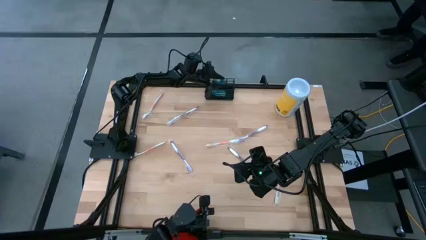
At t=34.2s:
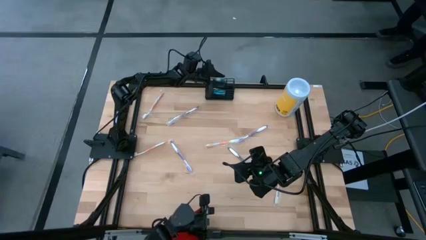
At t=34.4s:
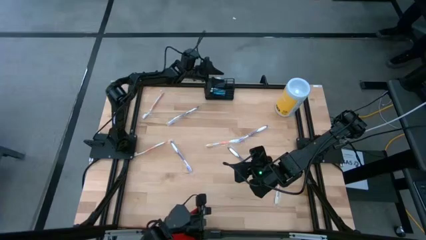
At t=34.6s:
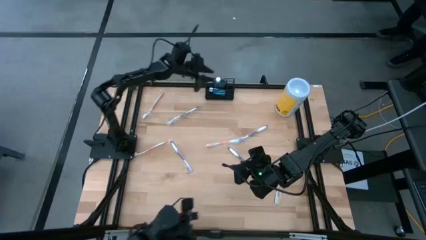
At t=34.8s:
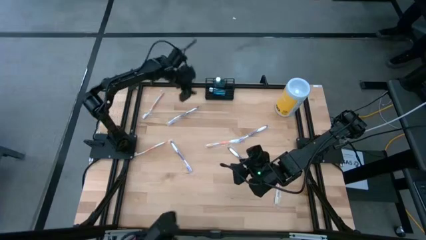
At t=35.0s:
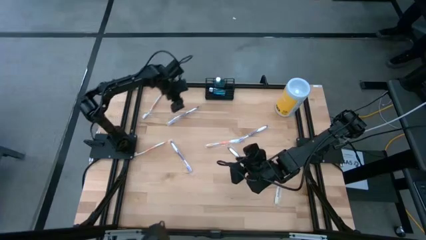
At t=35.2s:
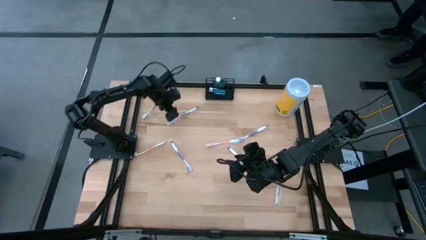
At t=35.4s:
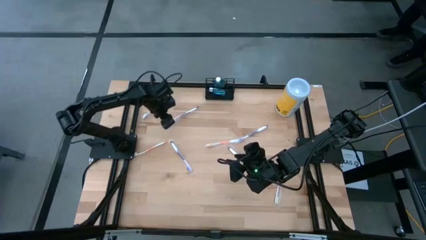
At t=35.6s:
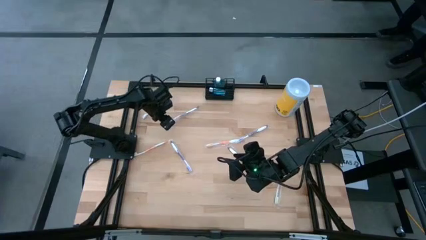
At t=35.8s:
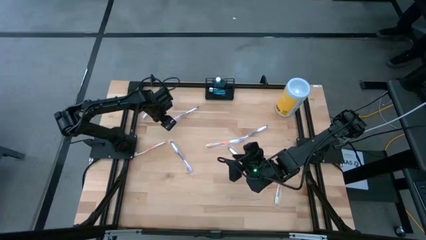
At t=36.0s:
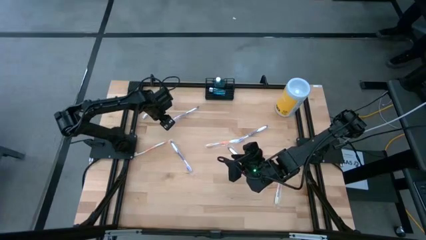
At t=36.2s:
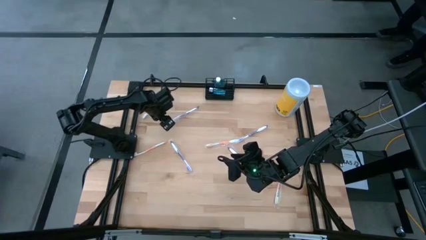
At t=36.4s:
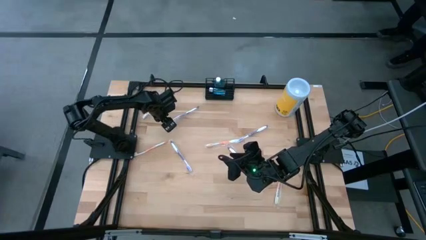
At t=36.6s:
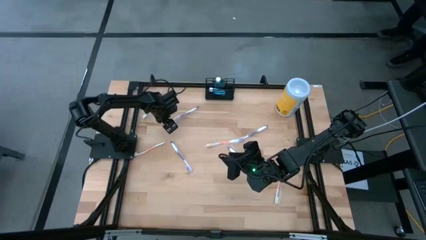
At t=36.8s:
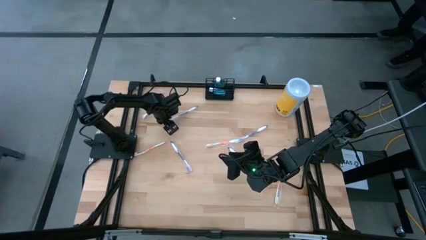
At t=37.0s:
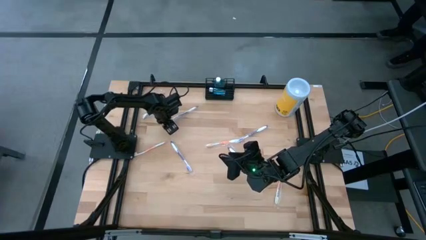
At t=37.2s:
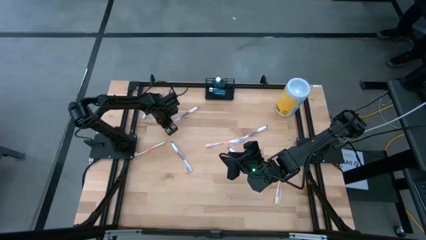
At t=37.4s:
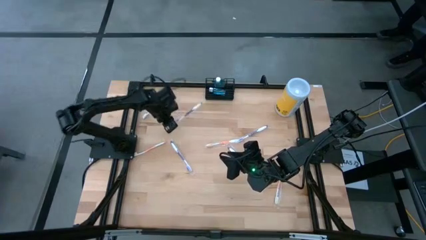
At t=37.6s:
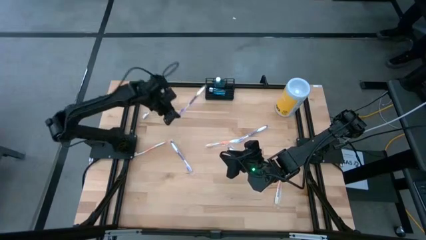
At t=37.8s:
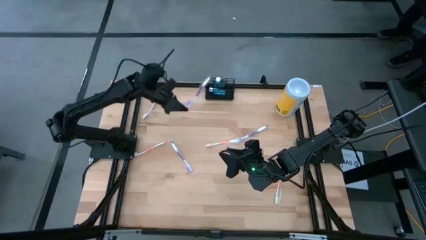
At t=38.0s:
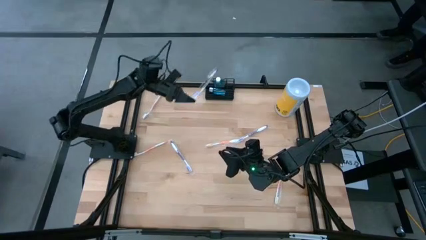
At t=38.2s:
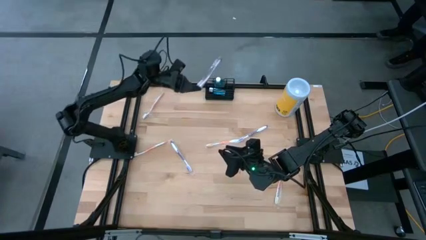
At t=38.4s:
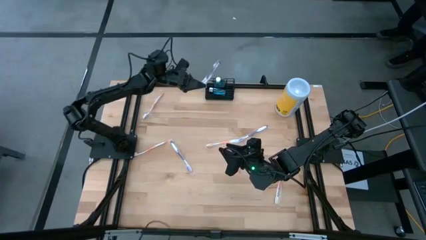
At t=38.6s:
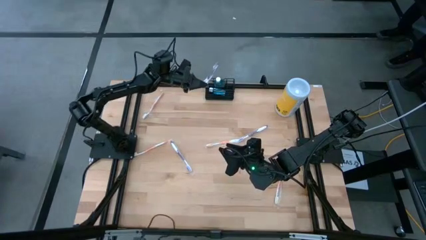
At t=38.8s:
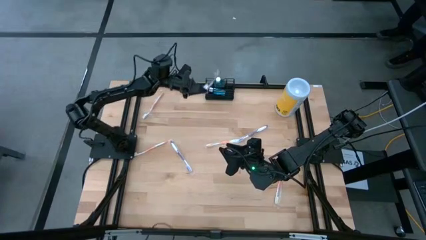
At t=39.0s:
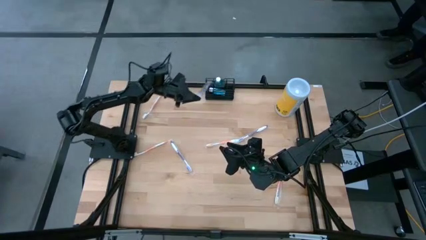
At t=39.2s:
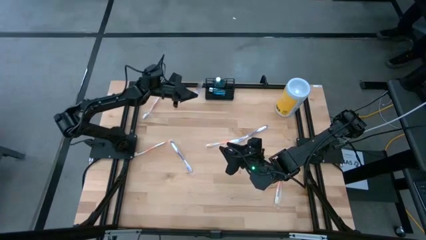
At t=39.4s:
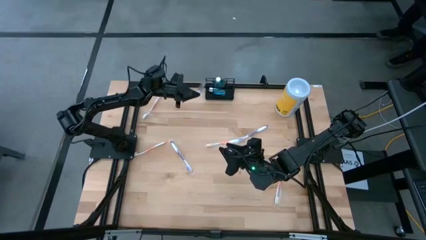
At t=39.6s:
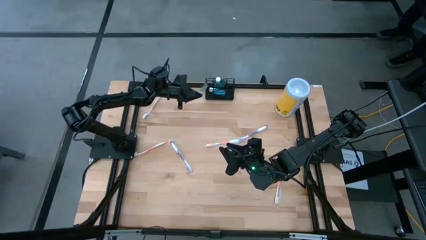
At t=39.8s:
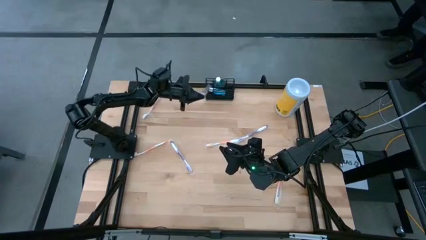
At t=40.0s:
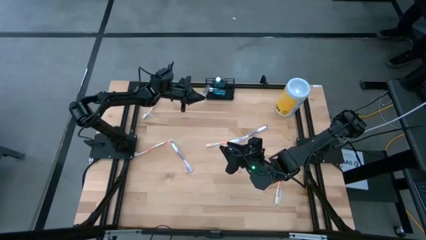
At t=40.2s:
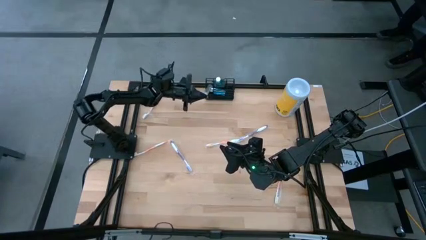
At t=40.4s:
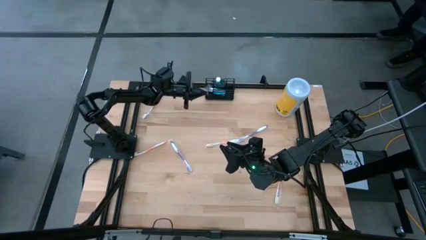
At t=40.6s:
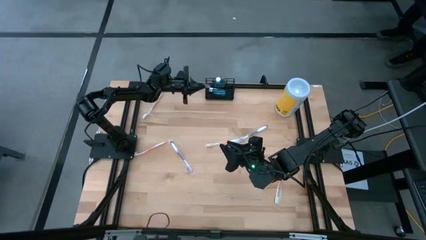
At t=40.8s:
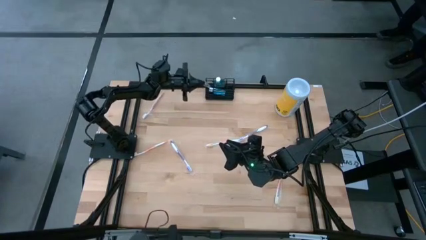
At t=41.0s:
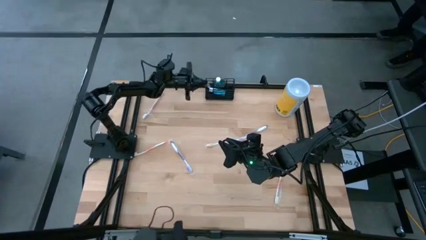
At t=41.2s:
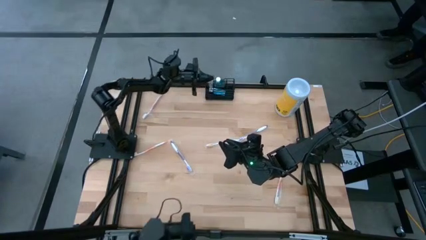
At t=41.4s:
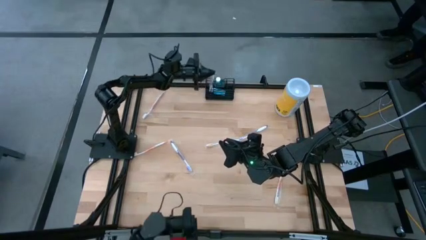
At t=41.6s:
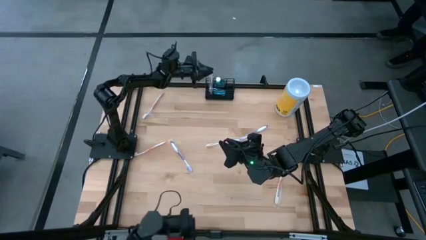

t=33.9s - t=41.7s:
Task: Pick & Place toothbrushing station
Put the violet toothbrush into the black wire organizer bin

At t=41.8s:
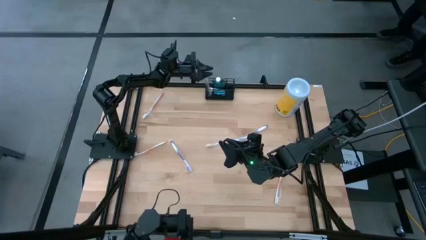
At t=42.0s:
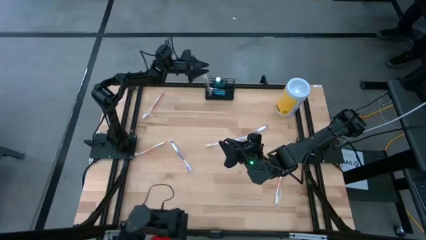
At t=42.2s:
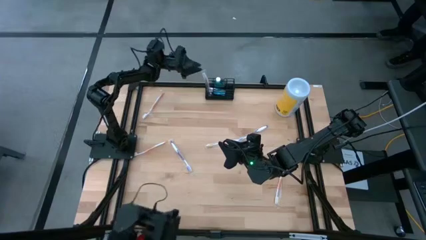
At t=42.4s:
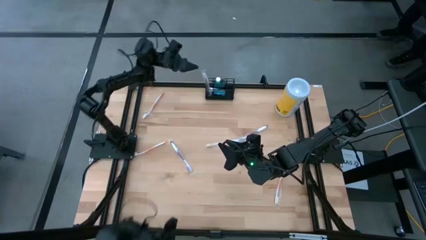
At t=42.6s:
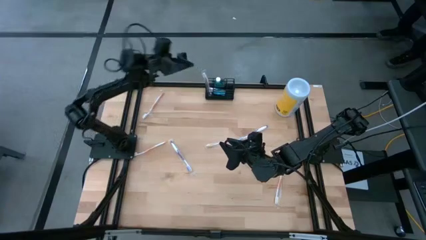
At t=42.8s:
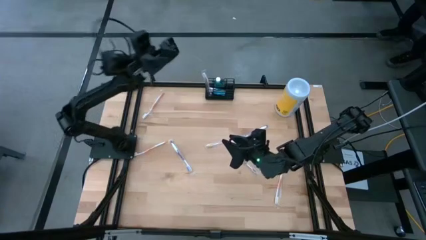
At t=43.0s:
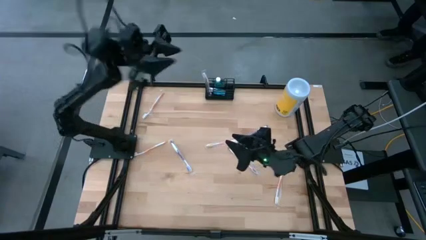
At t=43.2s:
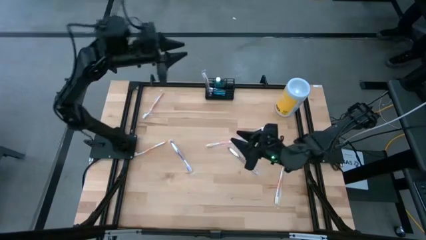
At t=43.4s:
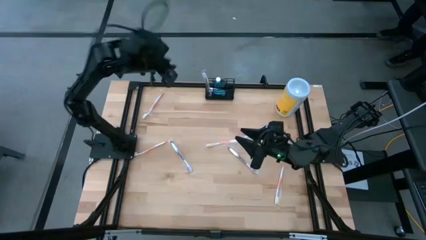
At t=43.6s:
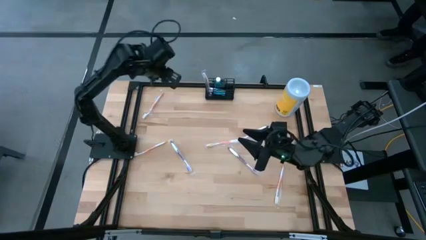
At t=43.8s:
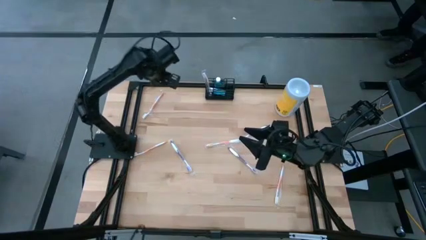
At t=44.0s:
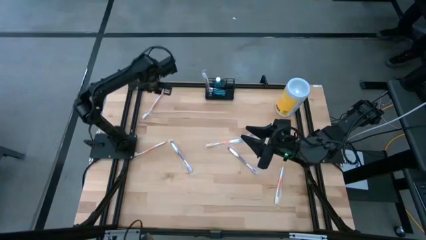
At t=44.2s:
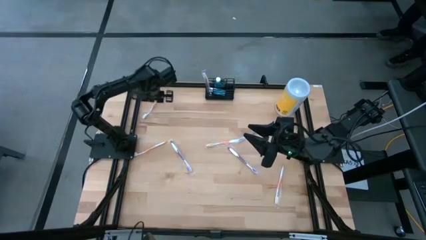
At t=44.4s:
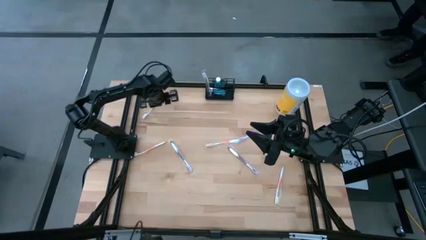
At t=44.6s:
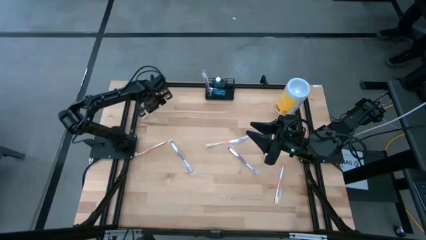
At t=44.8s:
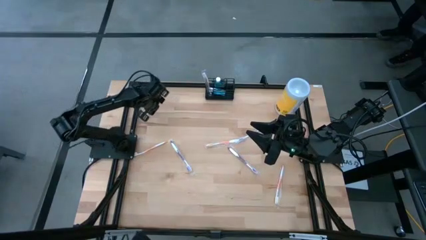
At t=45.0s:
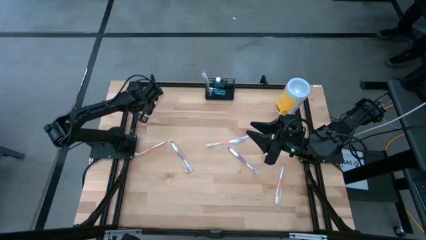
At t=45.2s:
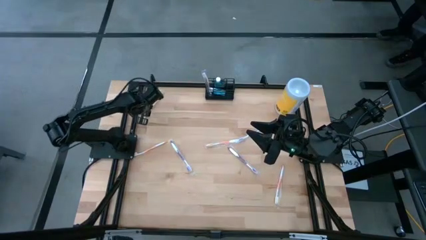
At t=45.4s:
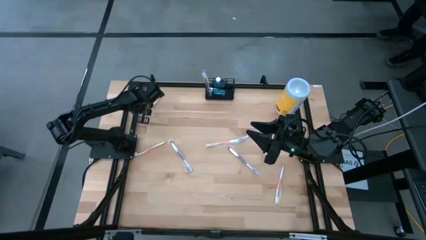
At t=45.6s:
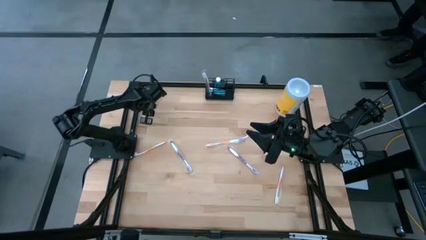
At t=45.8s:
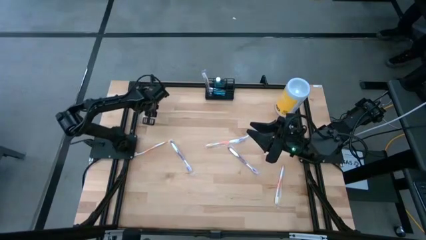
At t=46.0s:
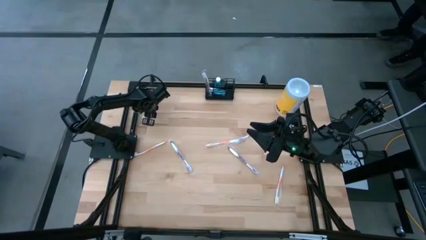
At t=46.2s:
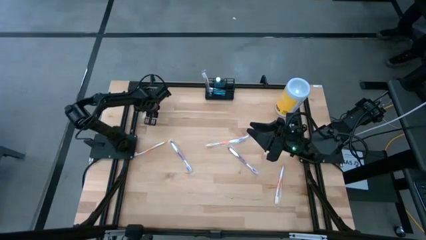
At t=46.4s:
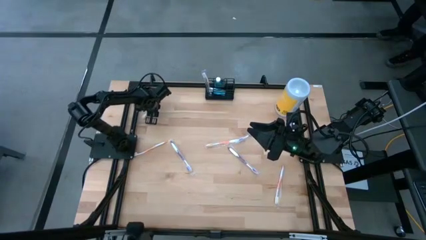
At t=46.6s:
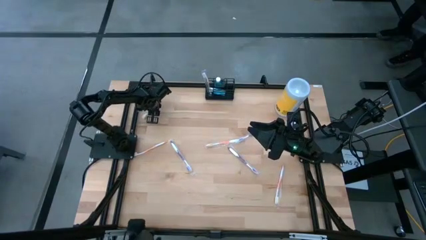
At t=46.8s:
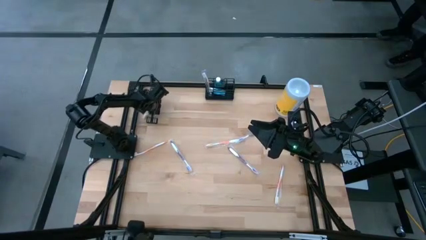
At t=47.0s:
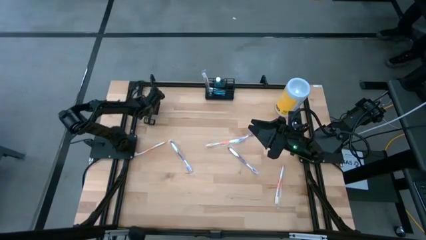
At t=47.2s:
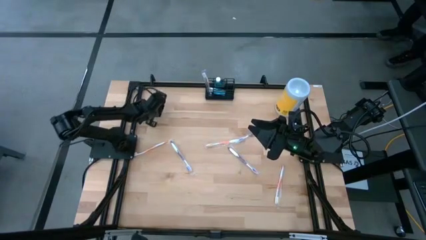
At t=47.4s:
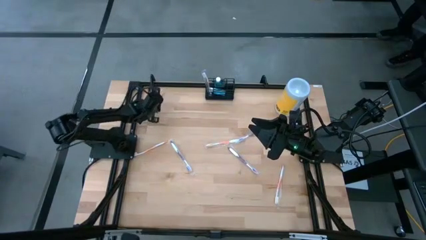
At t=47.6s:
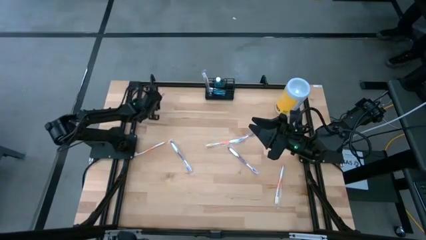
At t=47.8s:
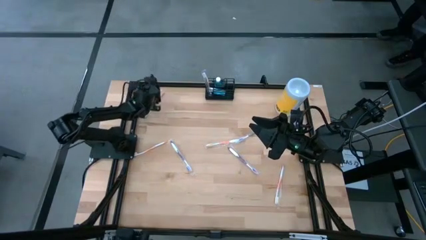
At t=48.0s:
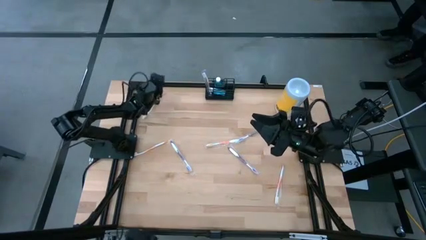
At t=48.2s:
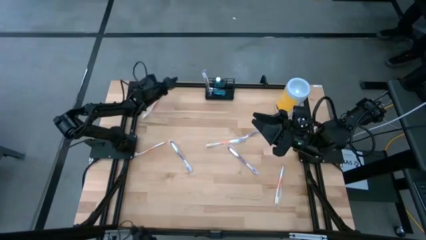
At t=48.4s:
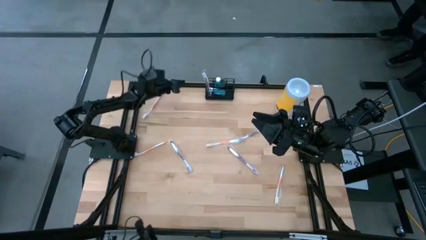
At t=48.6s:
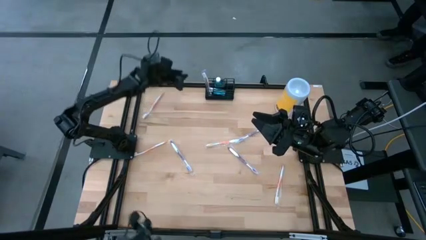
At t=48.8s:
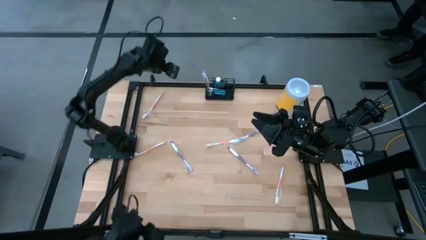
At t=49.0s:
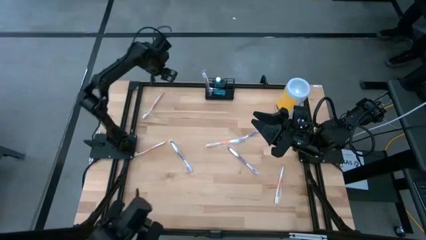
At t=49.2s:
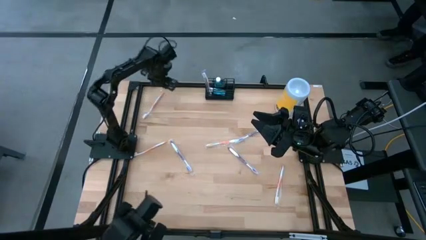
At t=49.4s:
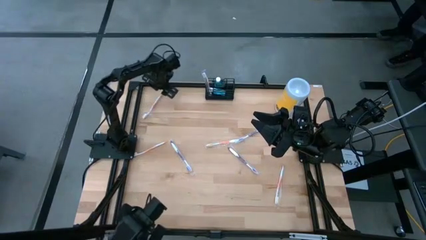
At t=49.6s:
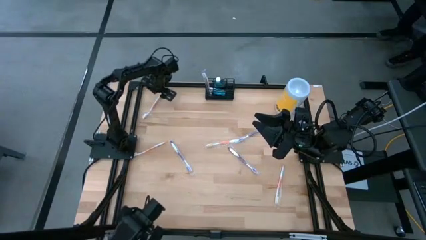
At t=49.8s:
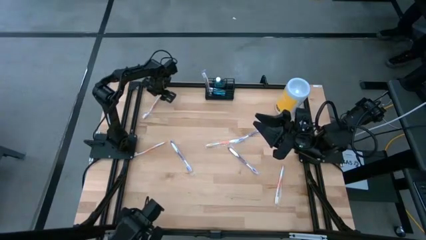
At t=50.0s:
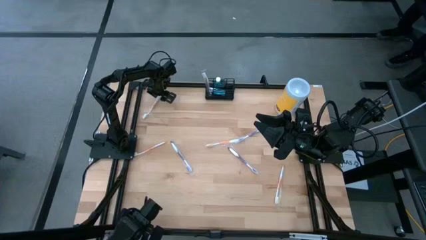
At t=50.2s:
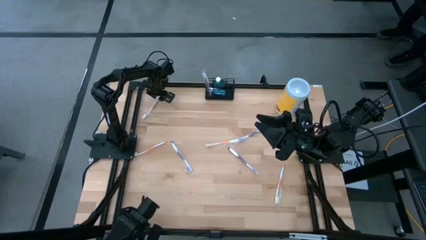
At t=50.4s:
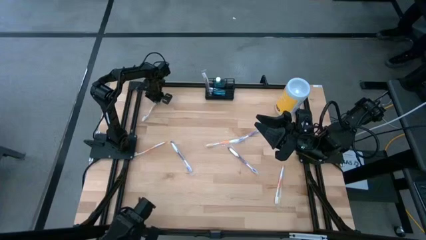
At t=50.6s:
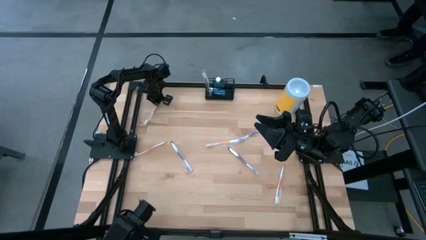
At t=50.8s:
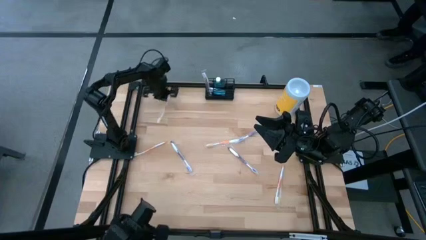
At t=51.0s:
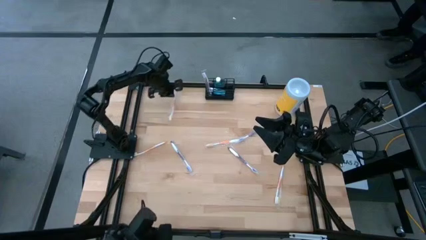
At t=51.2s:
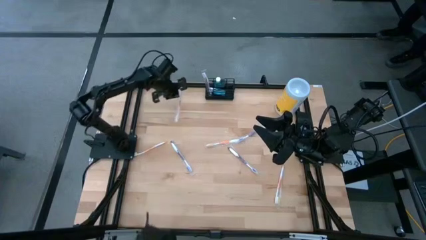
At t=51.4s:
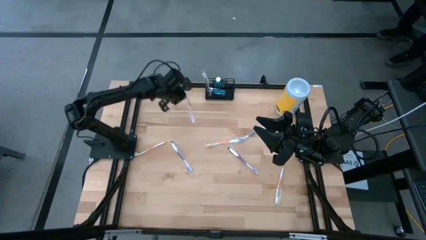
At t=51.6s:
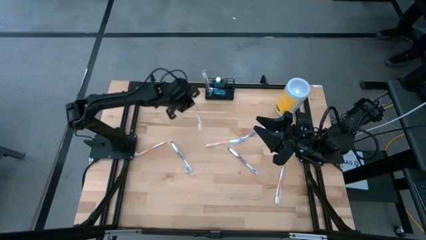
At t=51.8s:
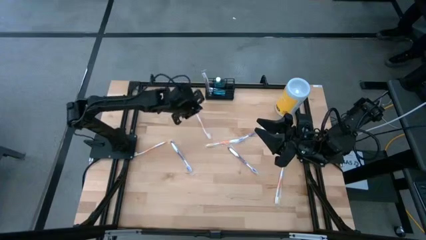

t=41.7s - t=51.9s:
Put the orange toothbrush into the black wire organizer bin
